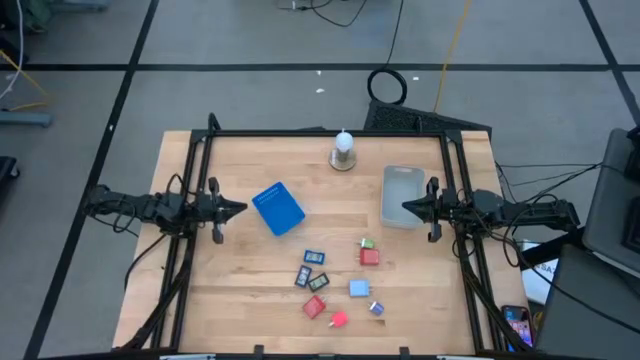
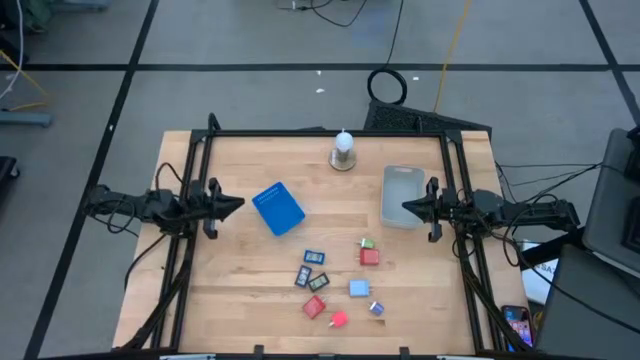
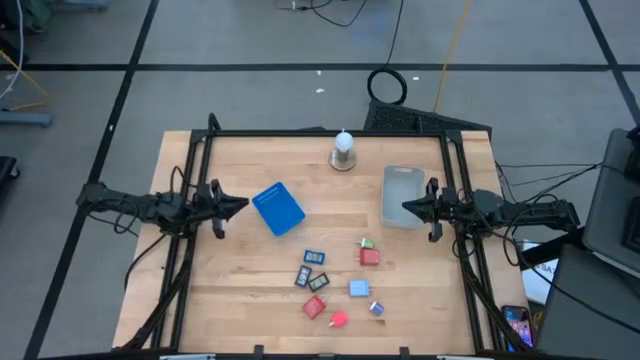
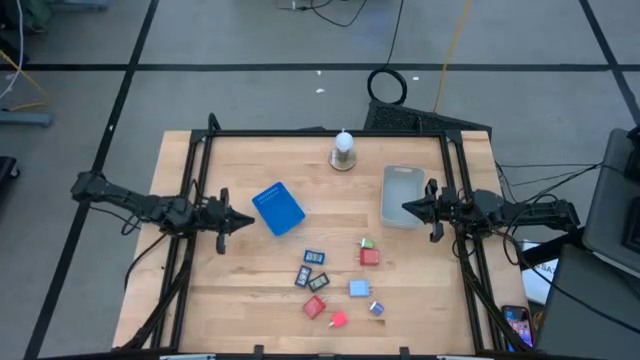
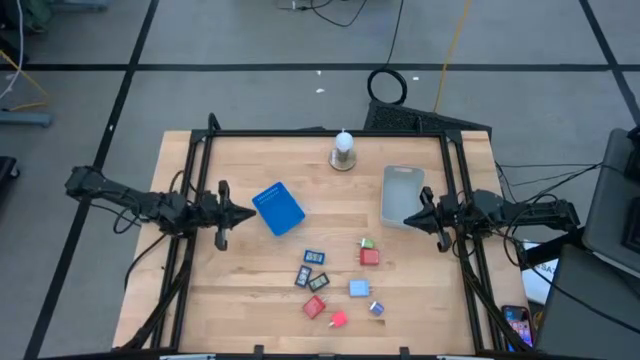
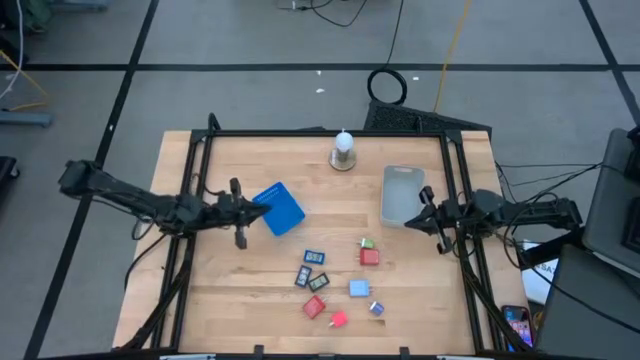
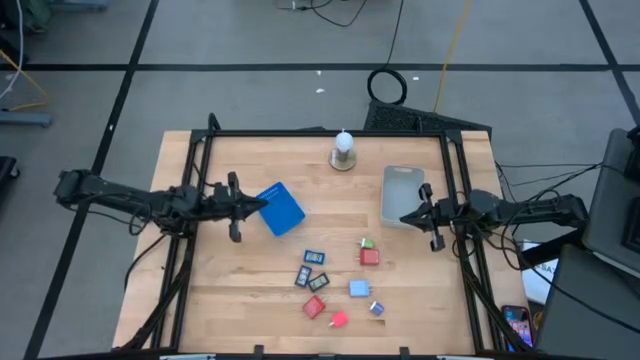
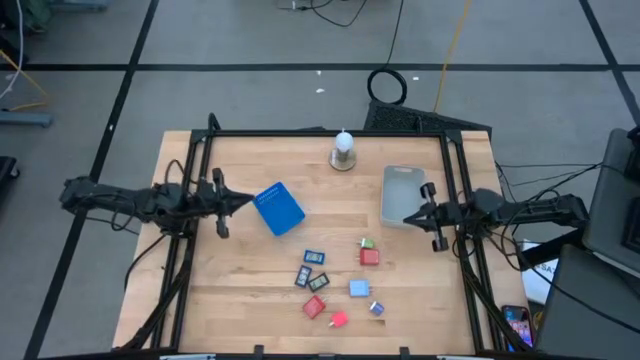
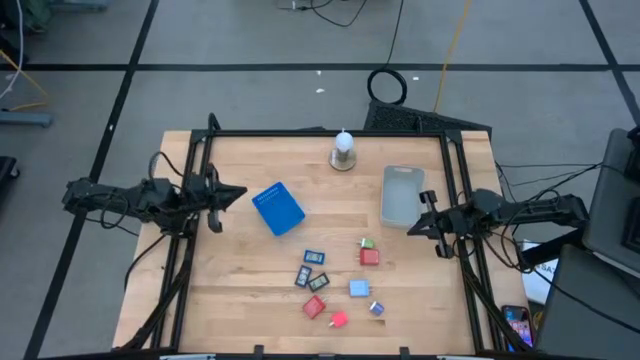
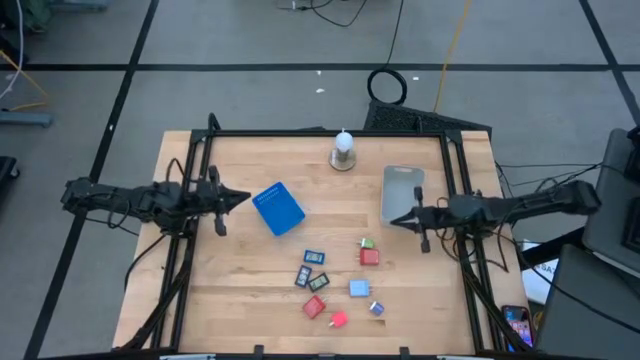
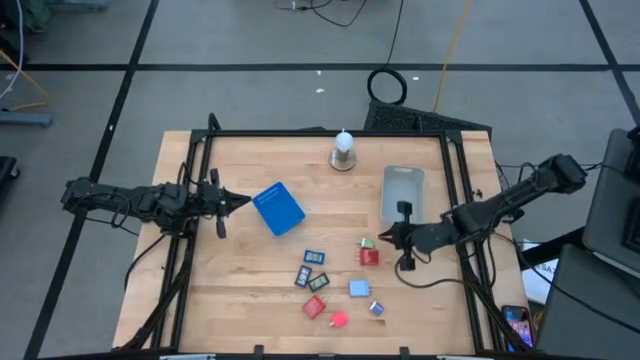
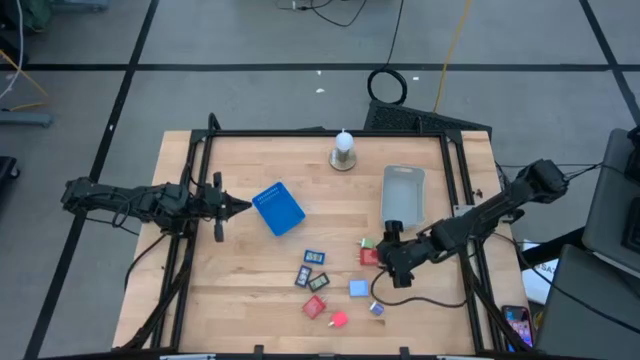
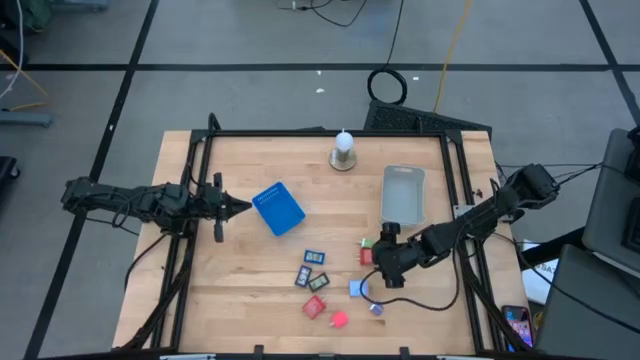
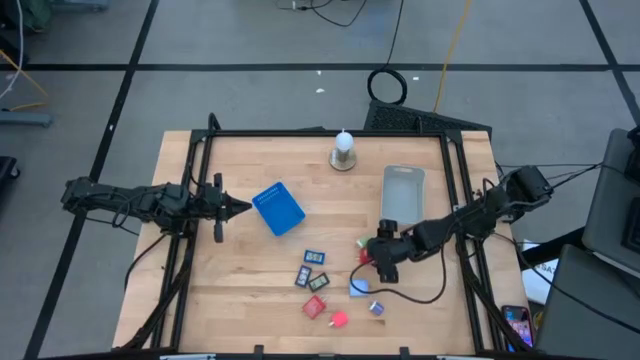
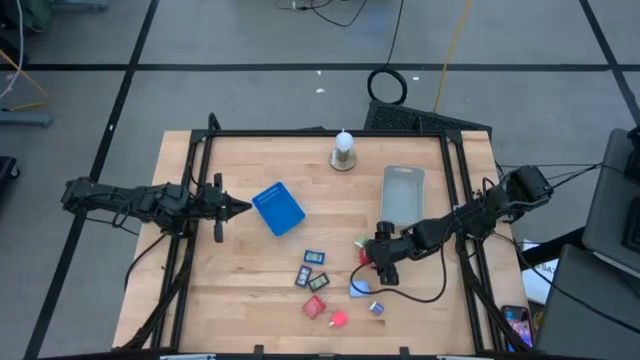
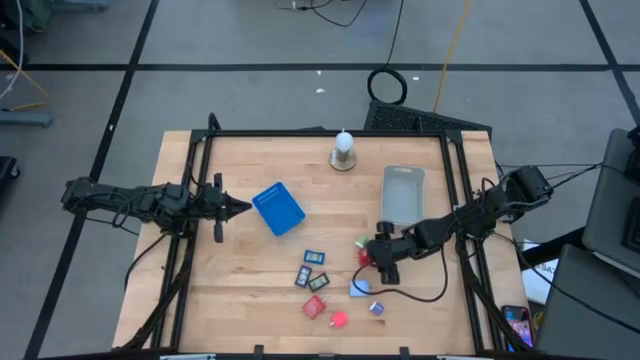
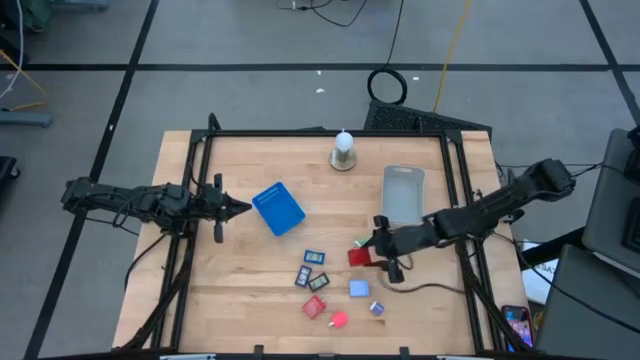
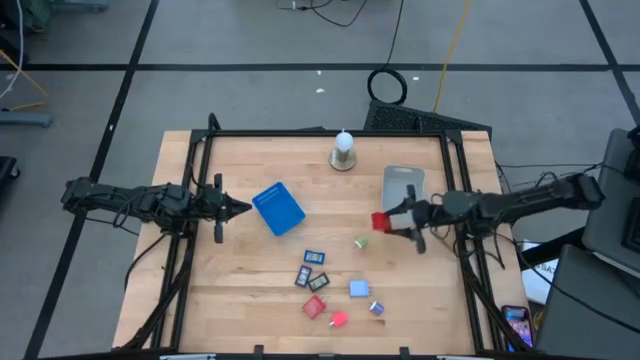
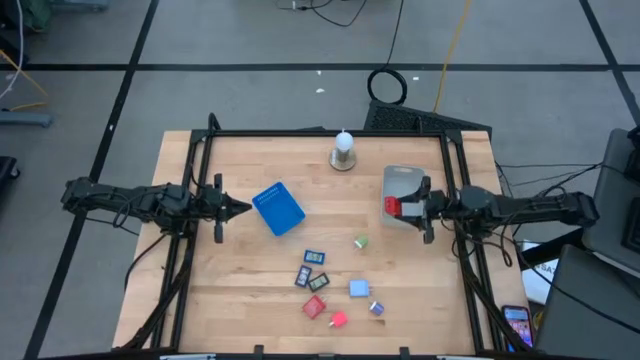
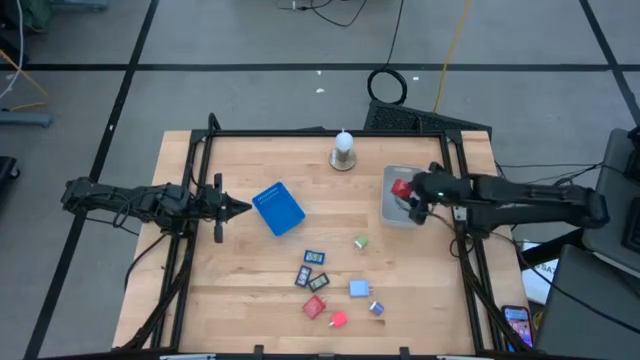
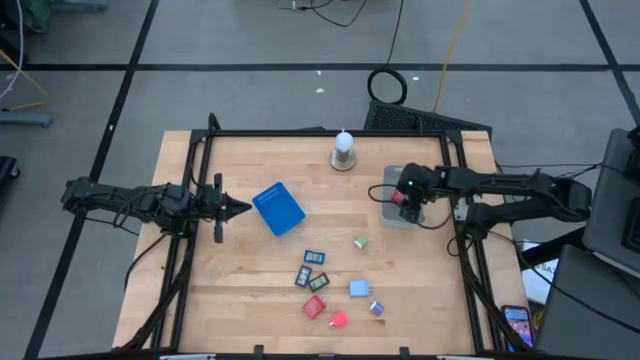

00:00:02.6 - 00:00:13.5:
Task: Pick & Place Office items
Put the top red charger adapter into the gray bin

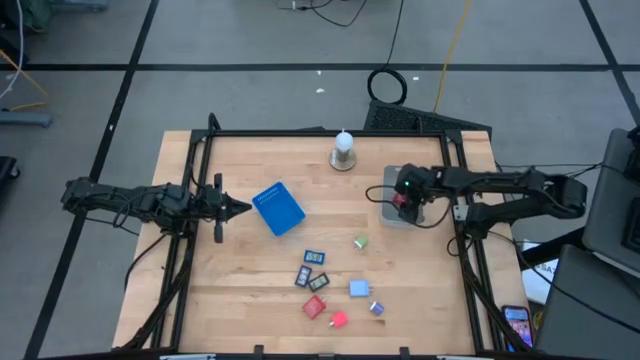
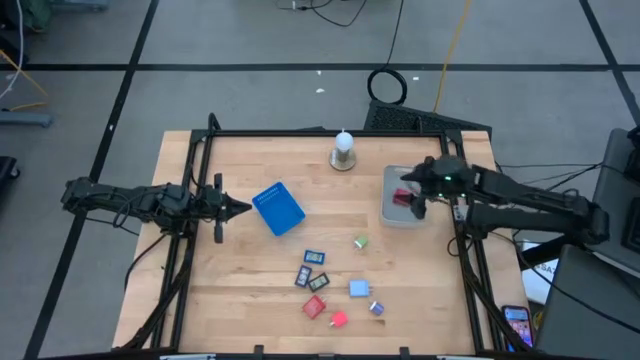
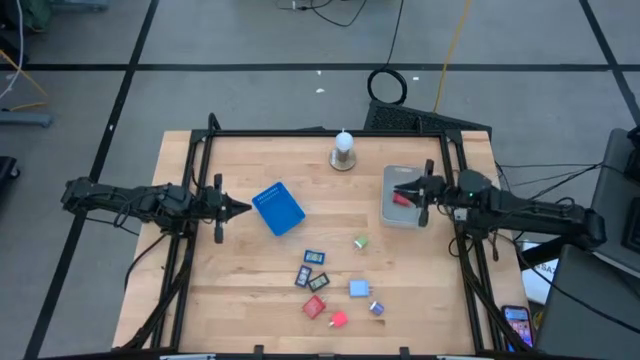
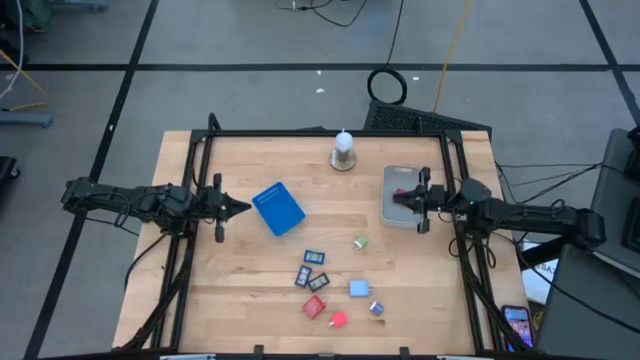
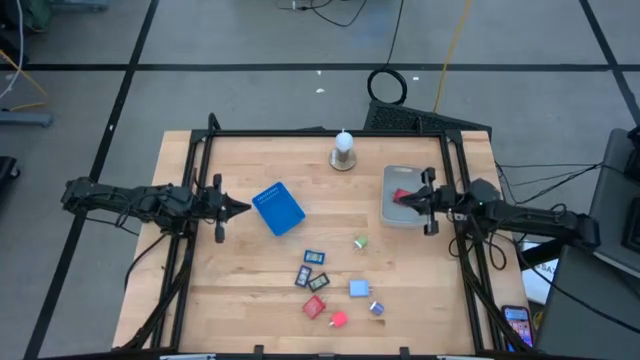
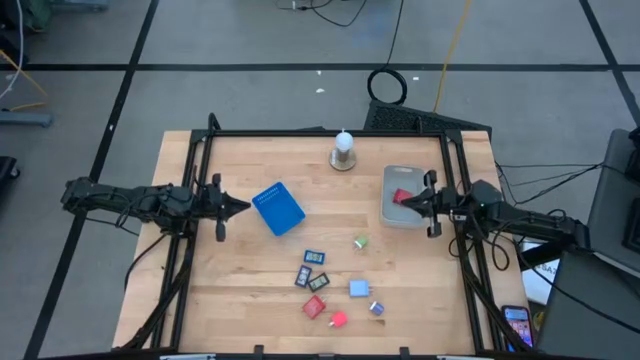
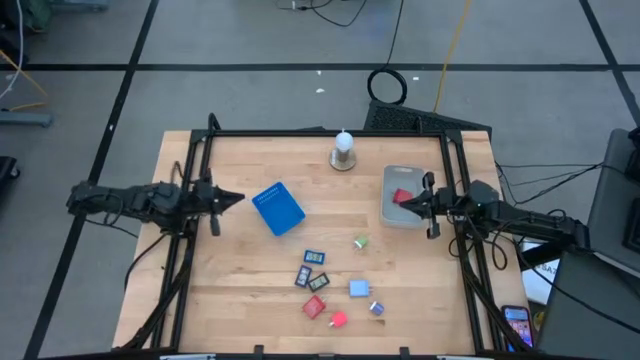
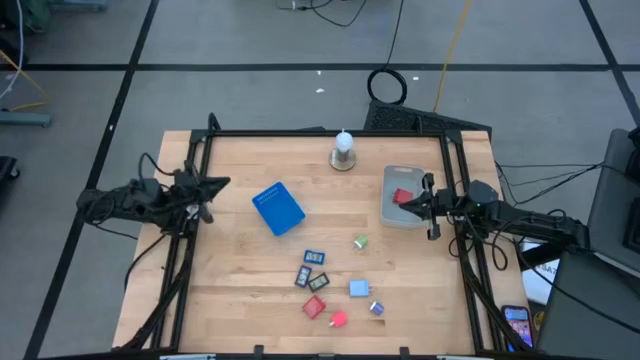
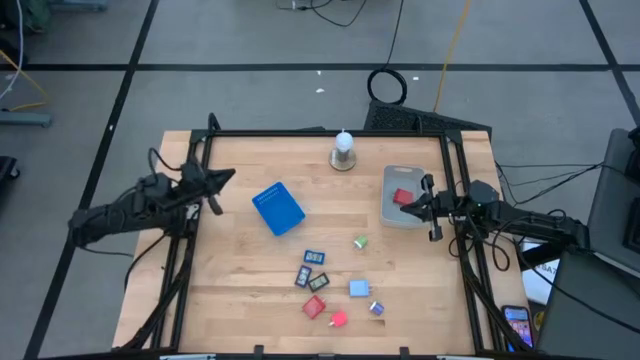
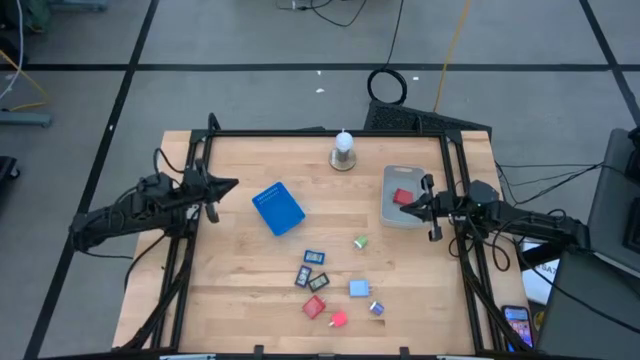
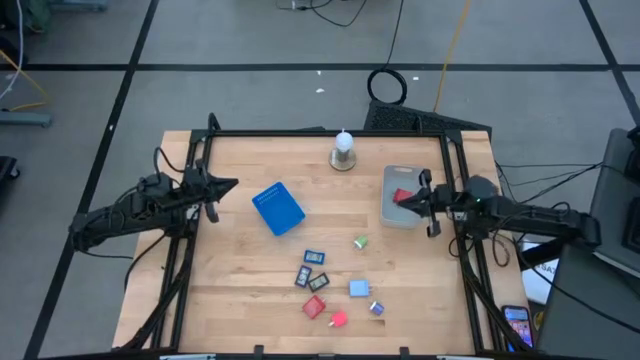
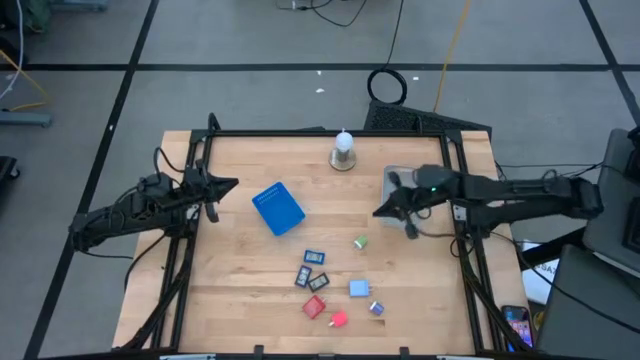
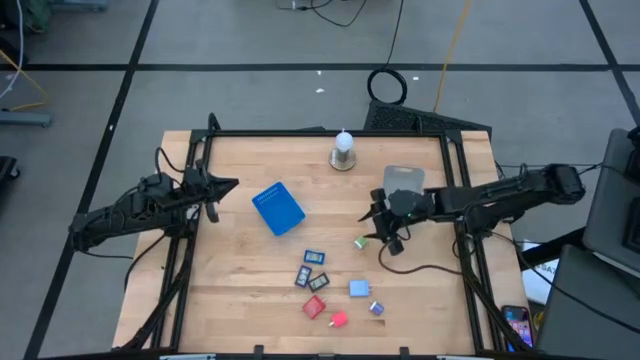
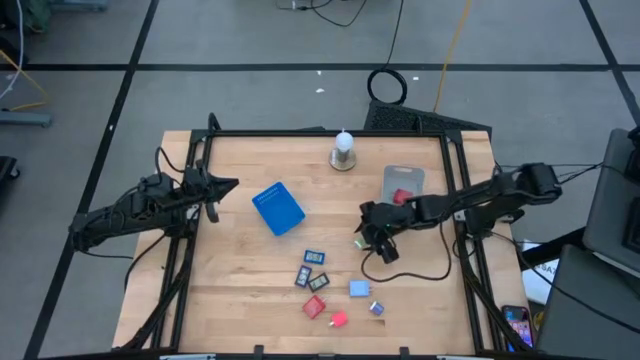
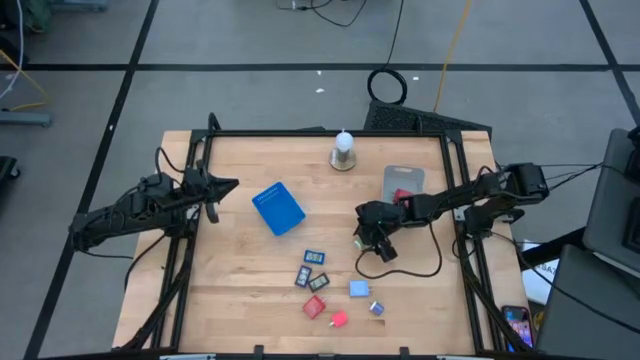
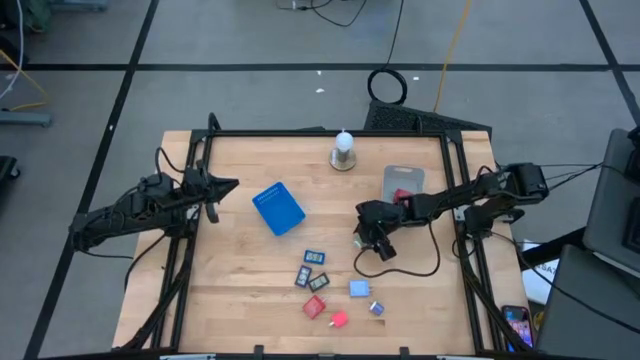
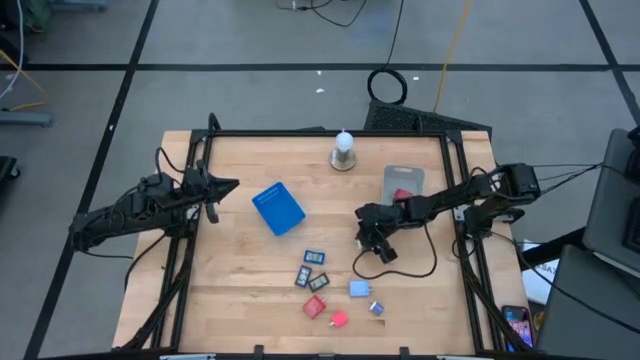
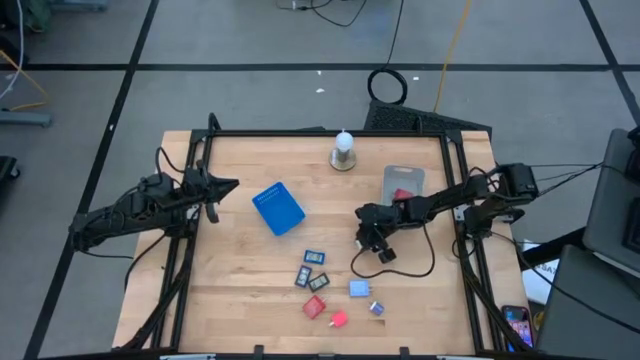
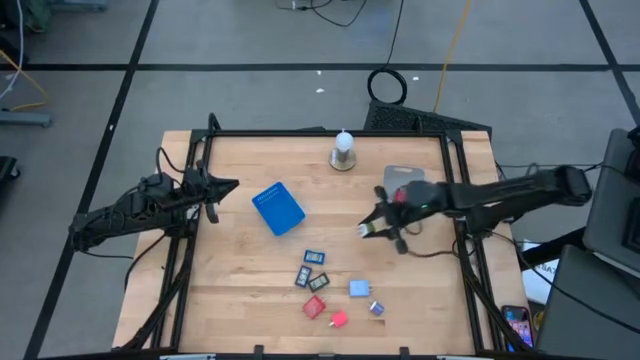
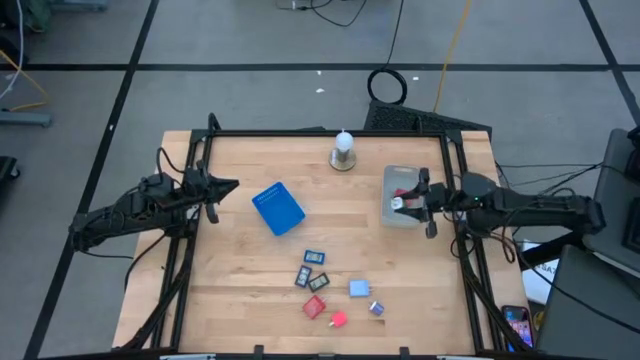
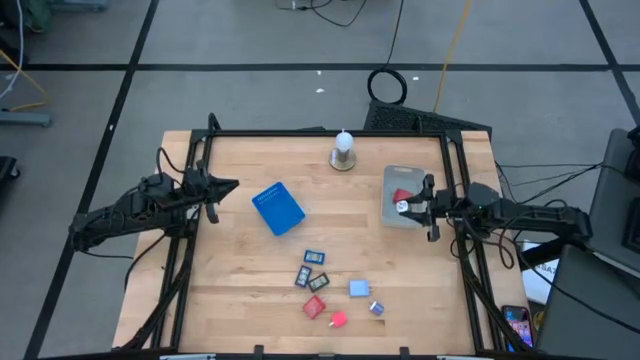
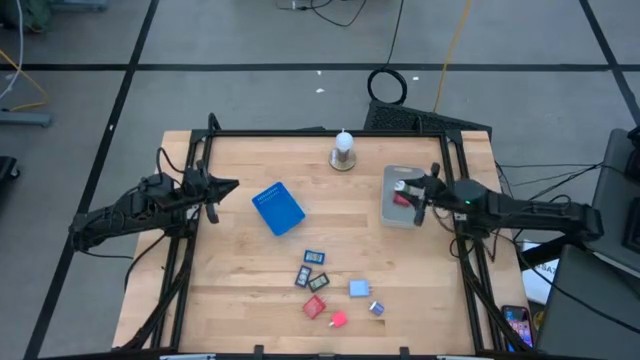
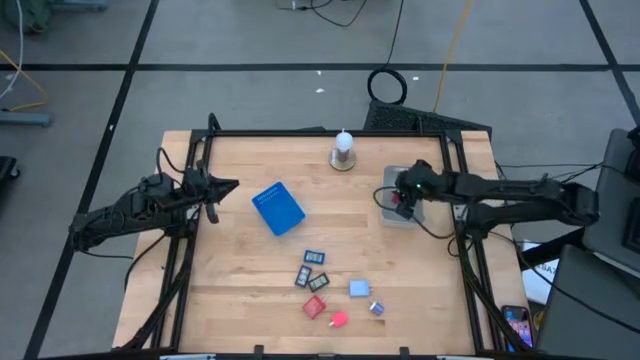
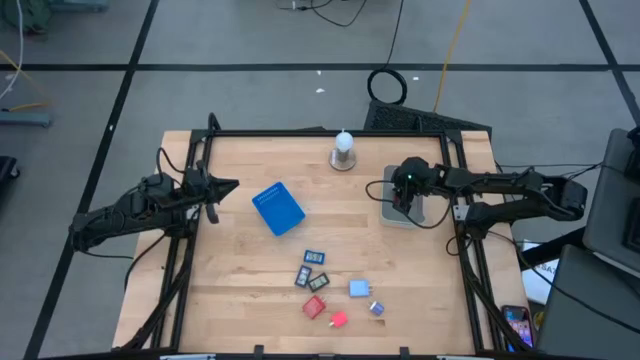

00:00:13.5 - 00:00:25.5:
Put the green charger adapter into the gray bin
